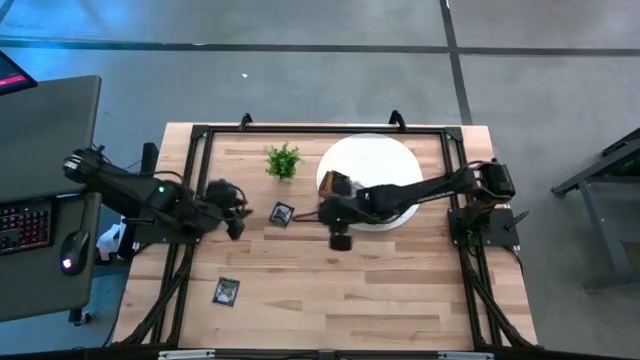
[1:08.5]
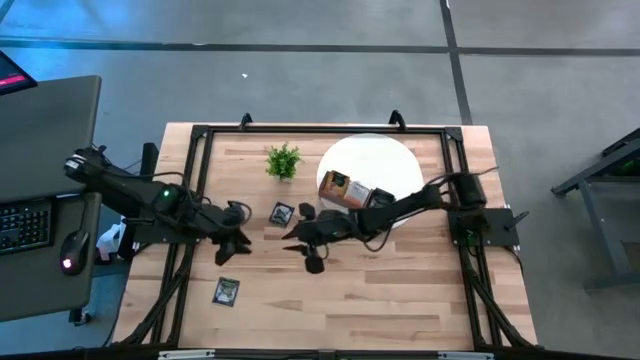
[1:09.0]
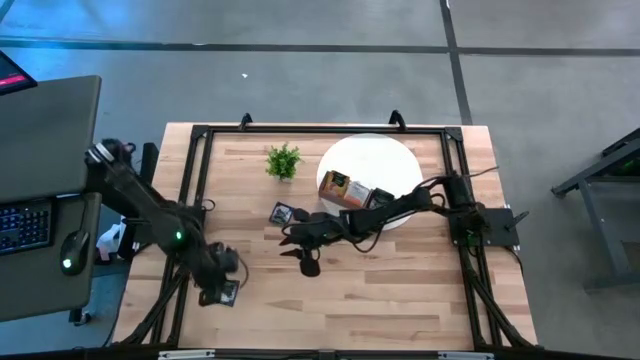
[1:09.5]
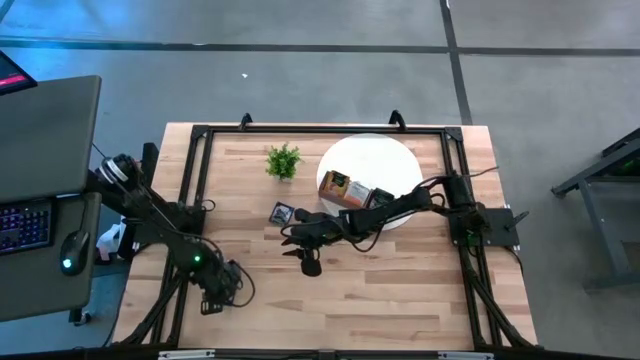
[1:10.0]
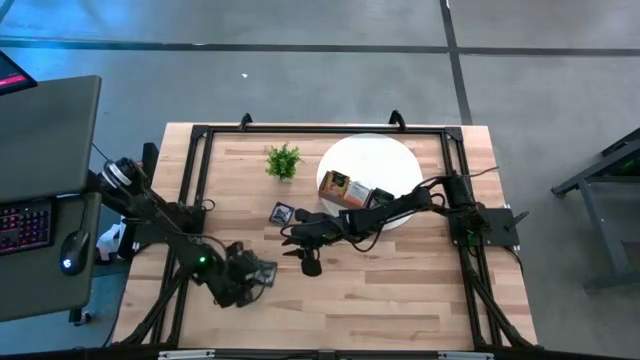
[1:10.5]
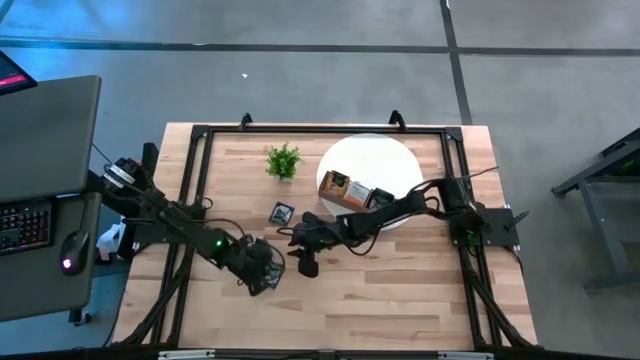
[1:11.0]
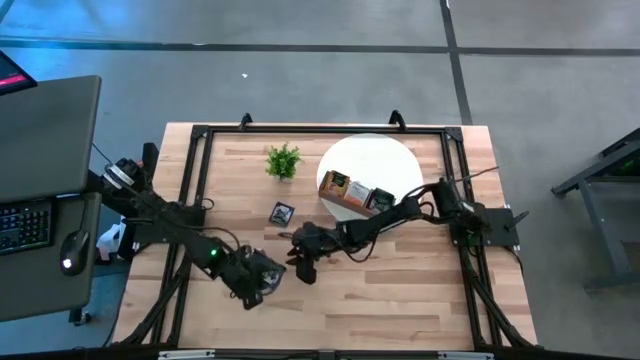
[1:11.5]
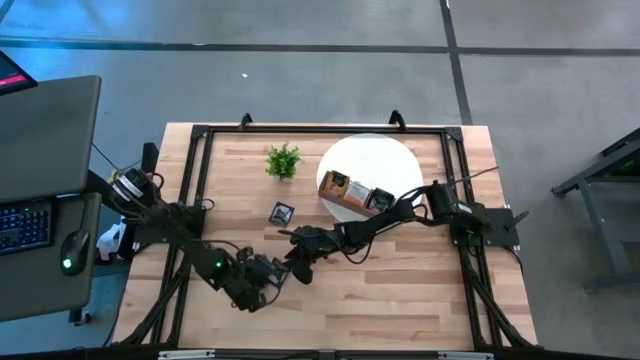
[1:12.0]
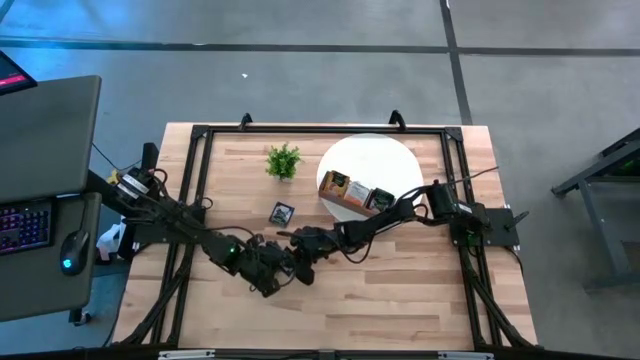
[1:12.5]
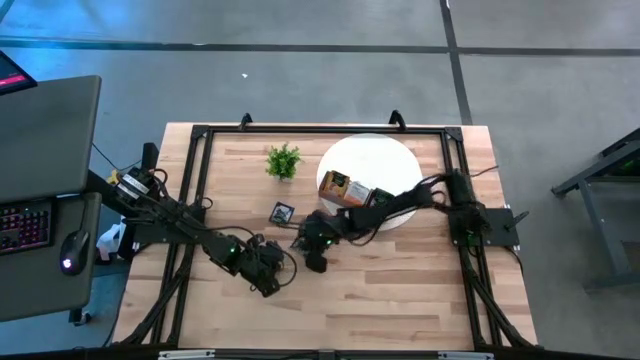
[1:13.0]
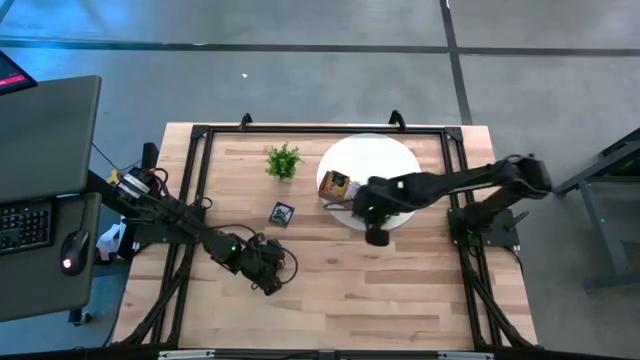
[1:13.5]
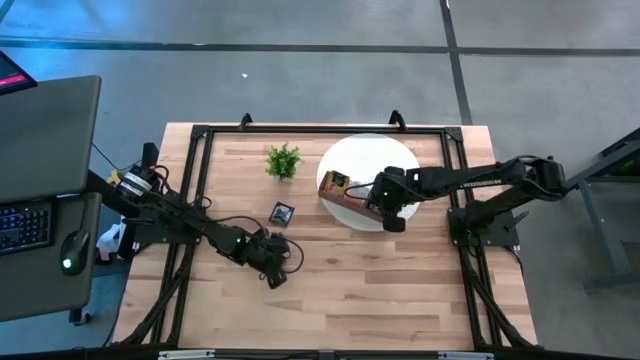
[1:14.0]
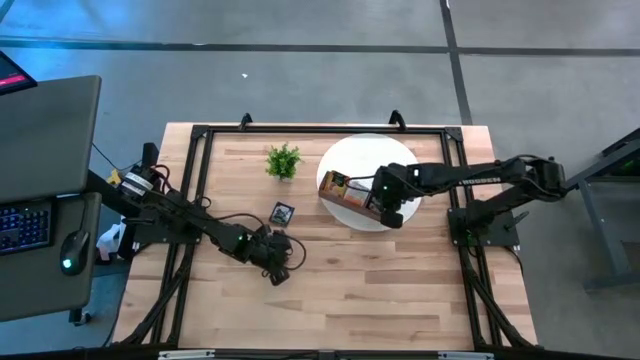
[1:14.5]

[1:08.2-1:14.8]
Task: Pick & Place Tea
Put the purple tea bag into the right compartment of the wooden organizer

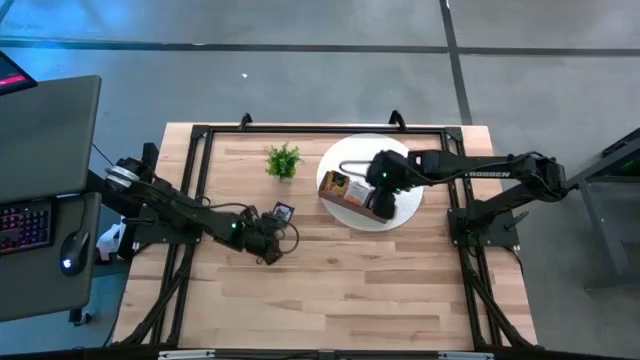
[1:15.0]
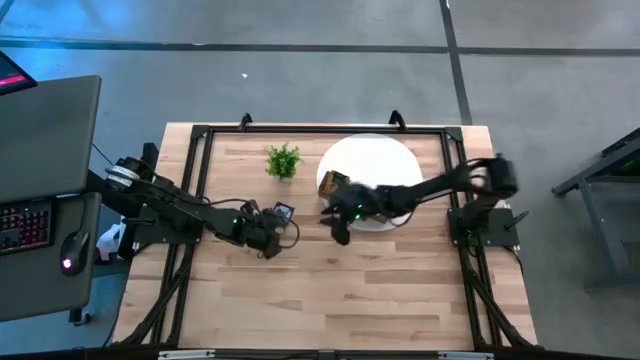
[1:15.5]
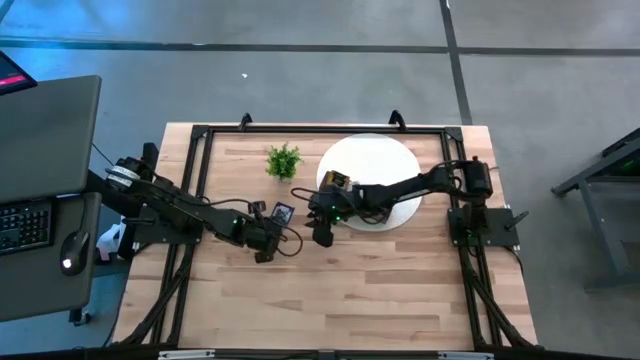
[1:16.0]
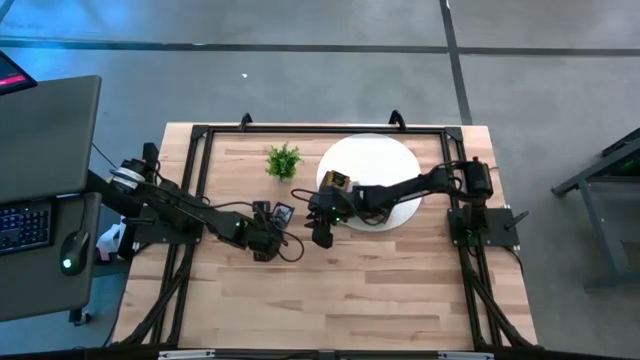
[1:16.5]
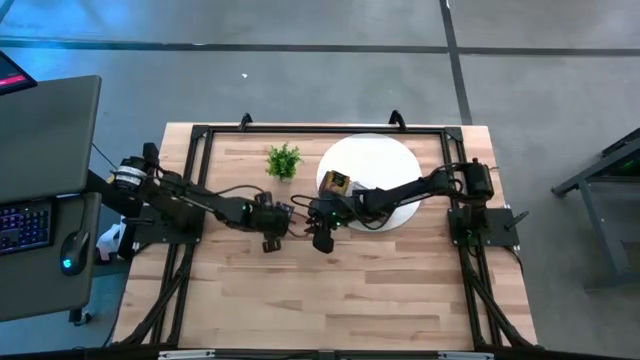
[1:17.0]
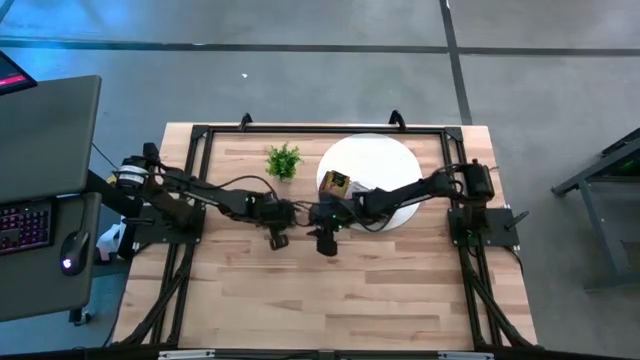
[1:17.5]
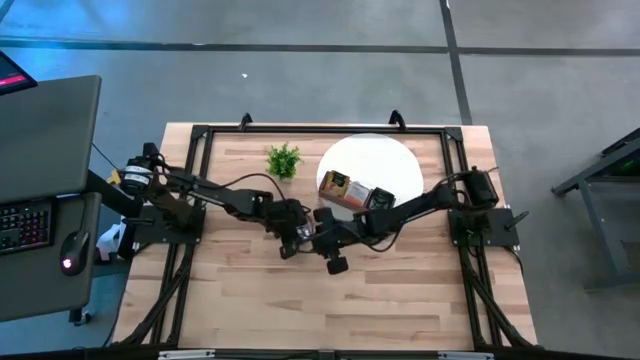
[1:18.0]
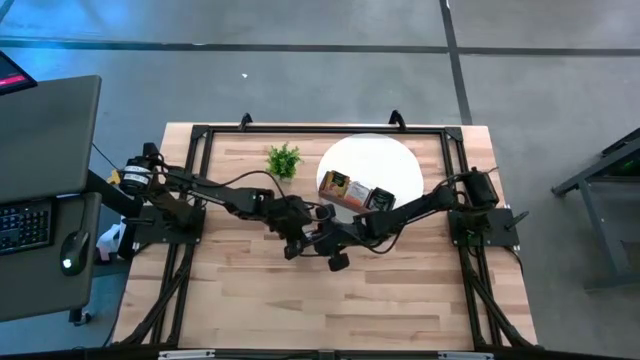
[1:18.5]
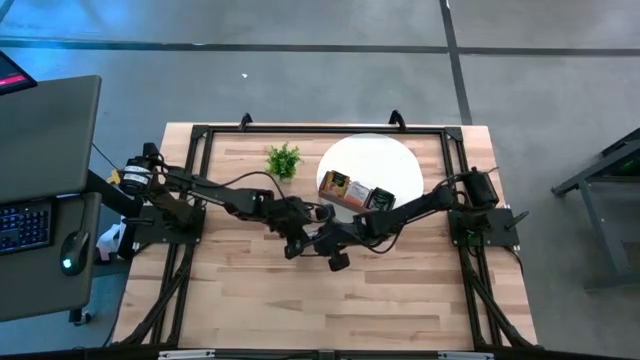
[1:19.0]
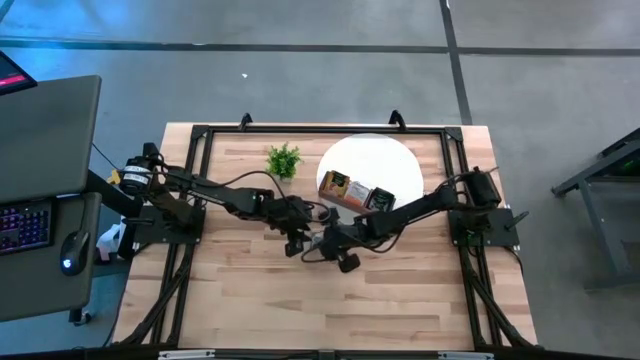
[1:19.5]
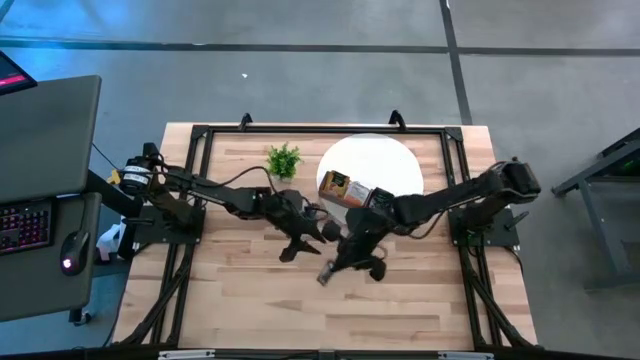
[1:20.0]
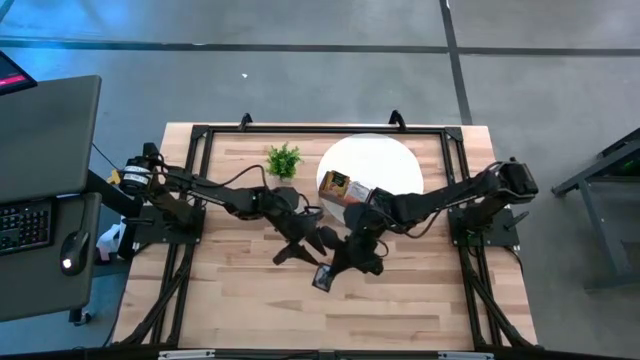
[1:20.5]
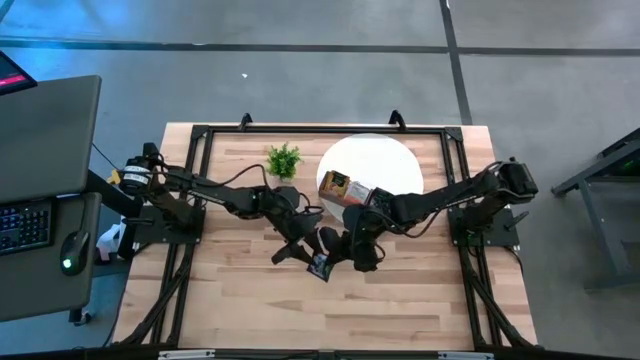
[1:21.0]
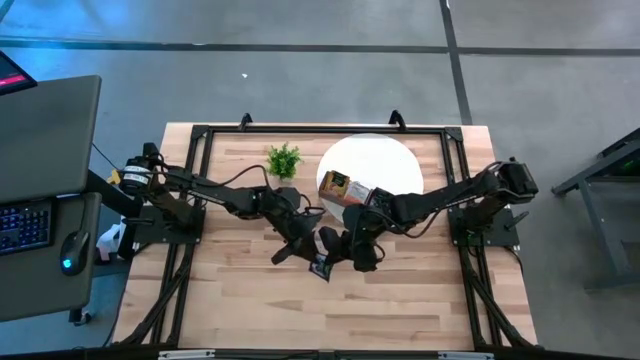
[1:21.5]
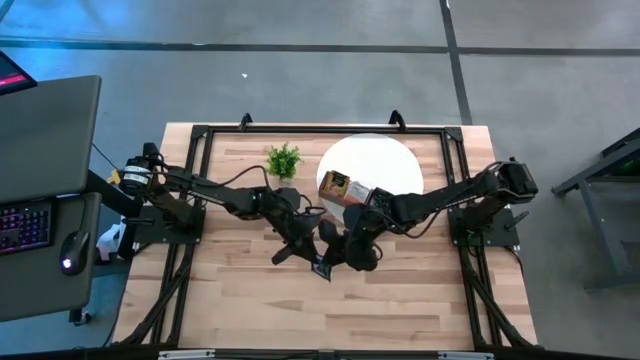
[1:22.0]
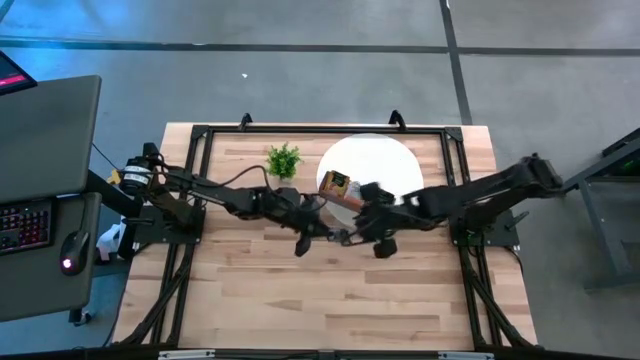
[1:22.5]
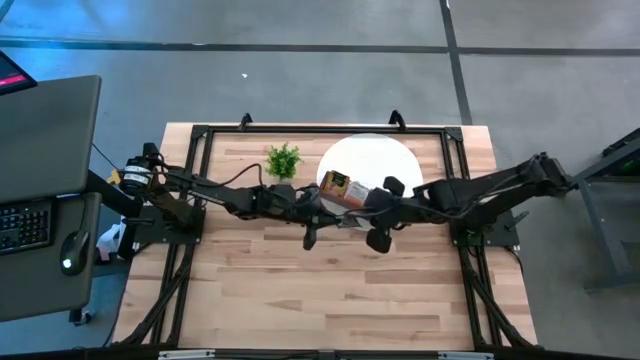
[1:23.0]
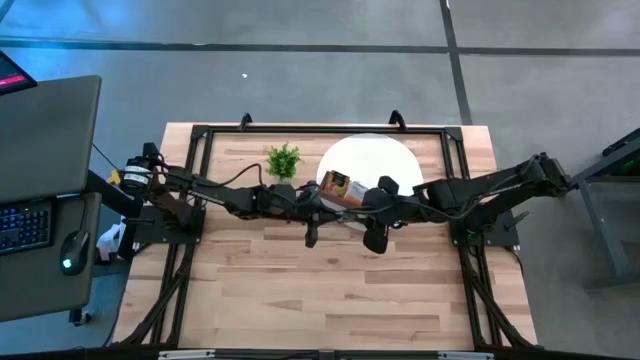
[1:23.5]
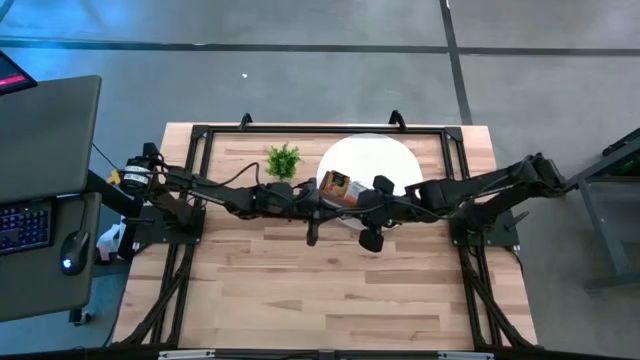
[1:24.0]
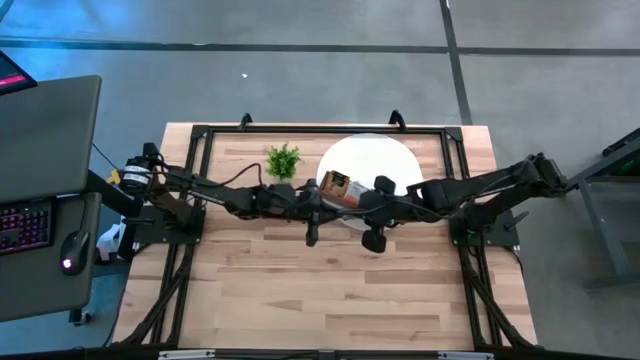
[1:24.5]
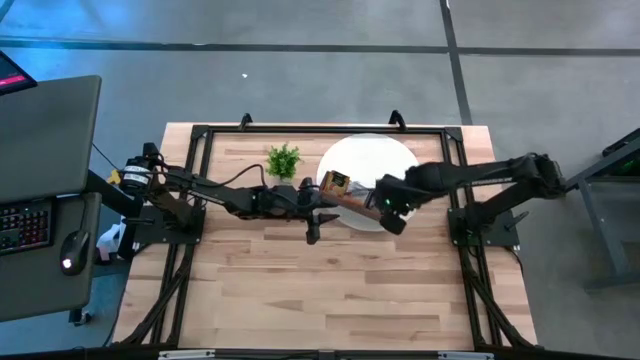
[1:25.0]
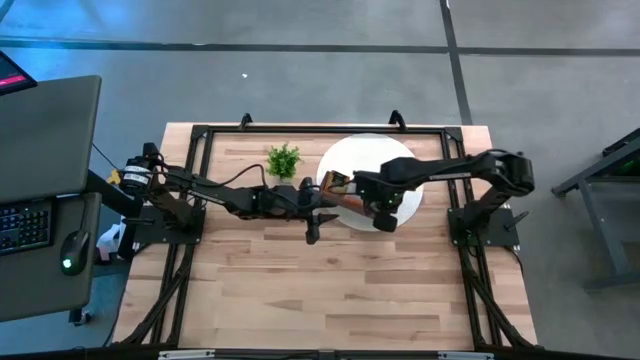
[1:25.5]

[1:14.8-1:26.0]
Put the purple tea bag into the right compartment of the wooden organizer

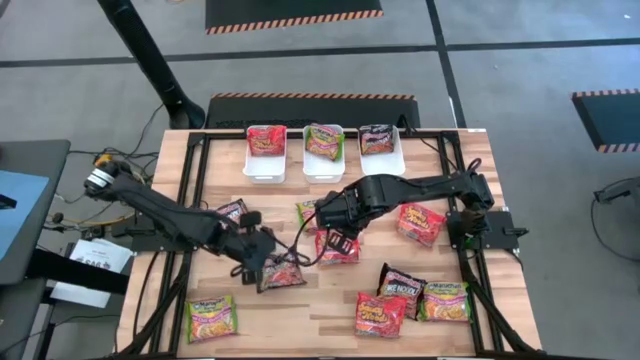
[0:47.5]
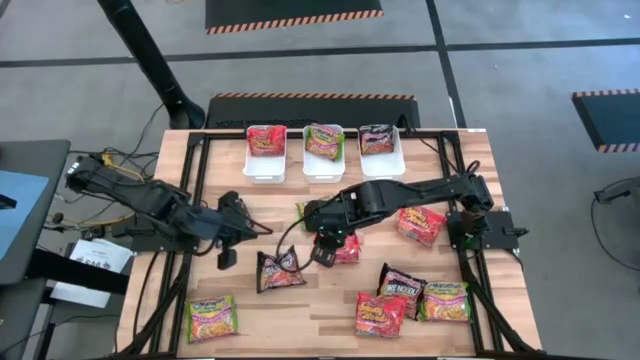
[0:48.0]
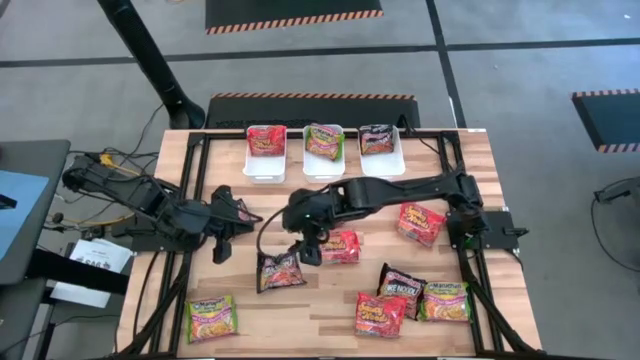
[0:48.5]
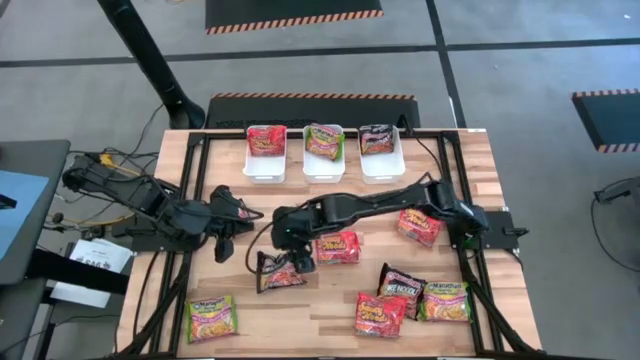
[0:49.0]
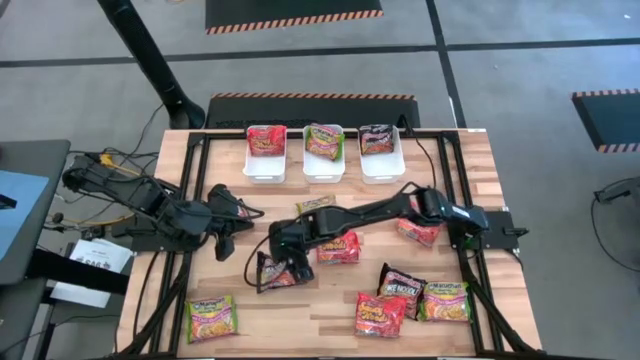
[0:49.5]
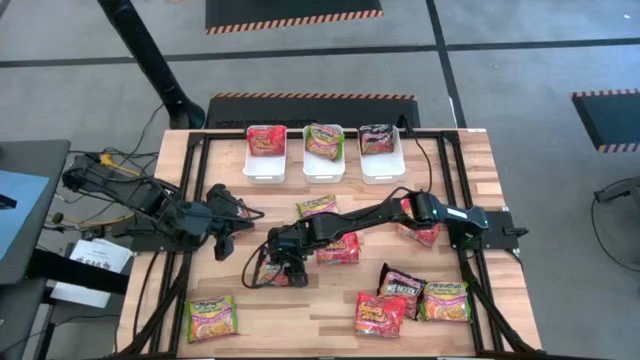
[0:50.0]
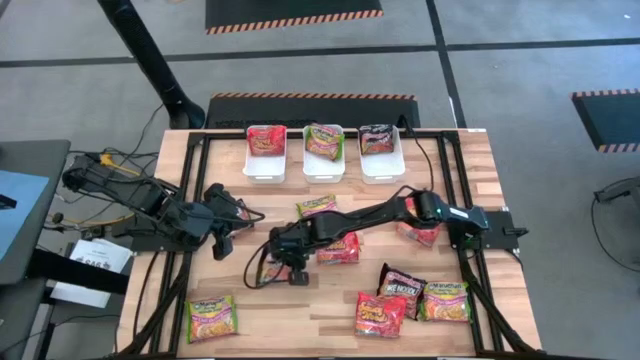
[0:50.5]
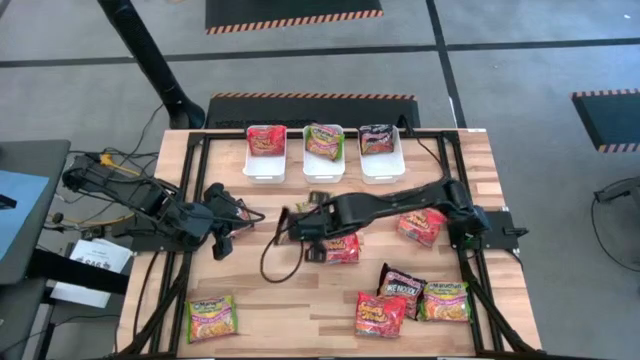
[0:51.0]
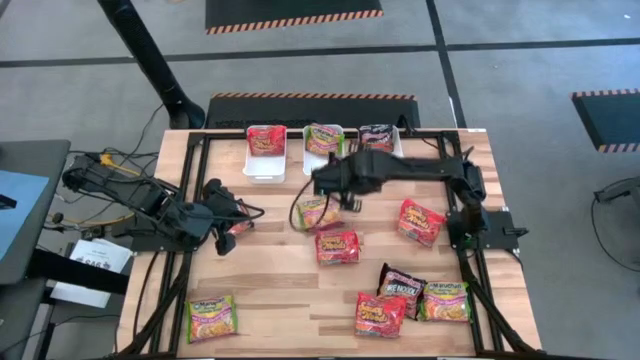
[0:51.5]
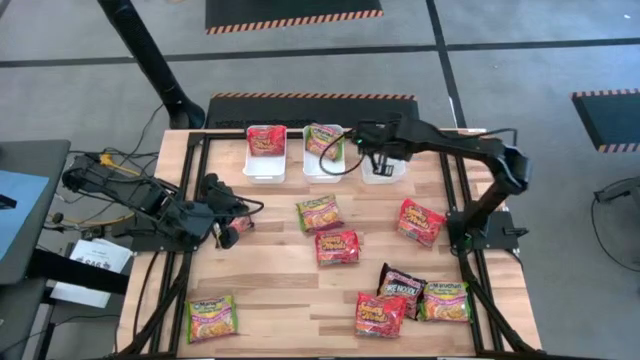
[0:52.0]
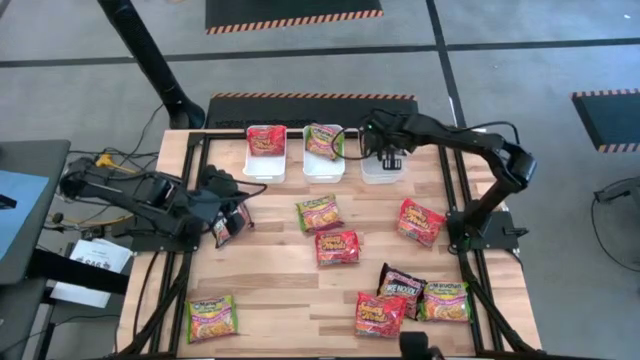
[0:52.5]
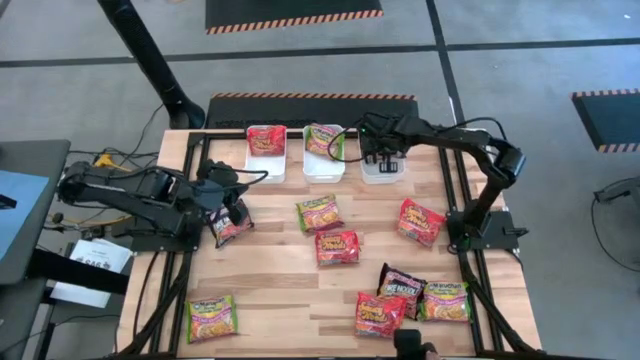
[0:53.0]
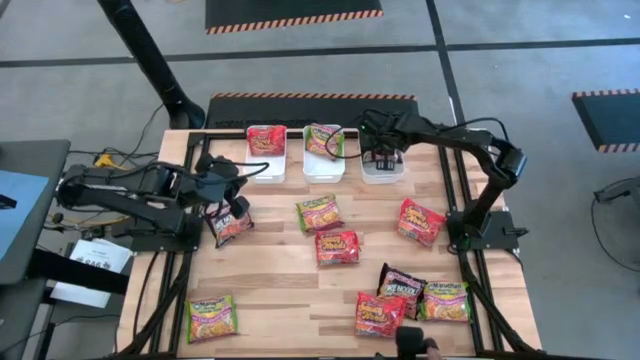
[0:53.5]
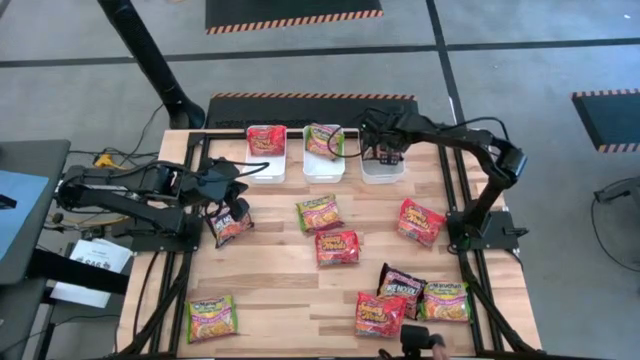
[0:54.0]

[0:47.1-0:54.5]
Task: Sort Maruchan noodles
Put the bottom left black noodle pack into the right white bin
